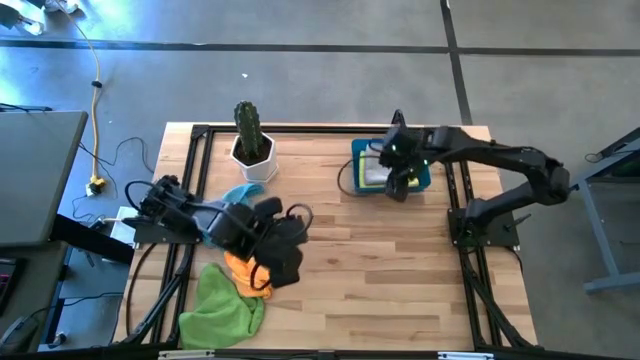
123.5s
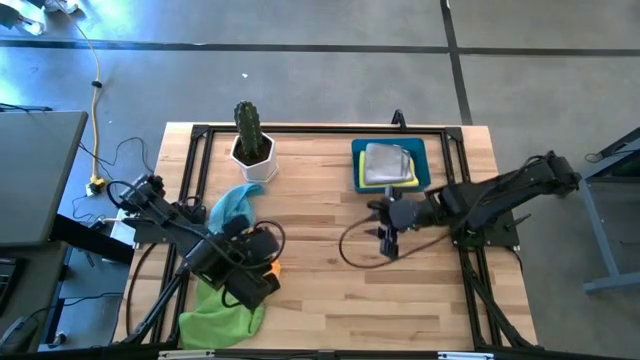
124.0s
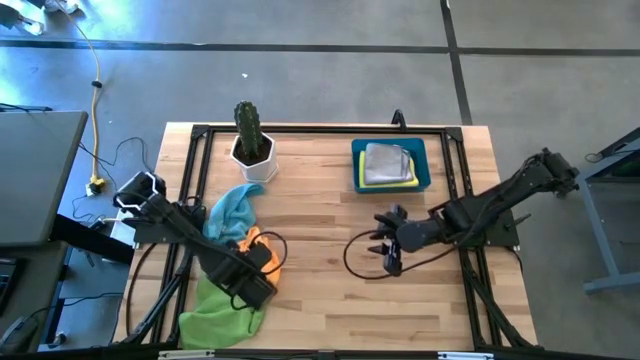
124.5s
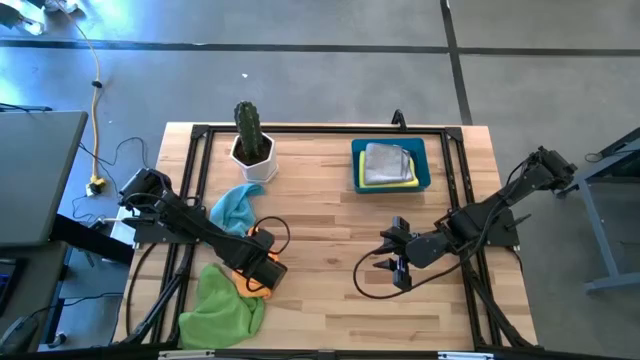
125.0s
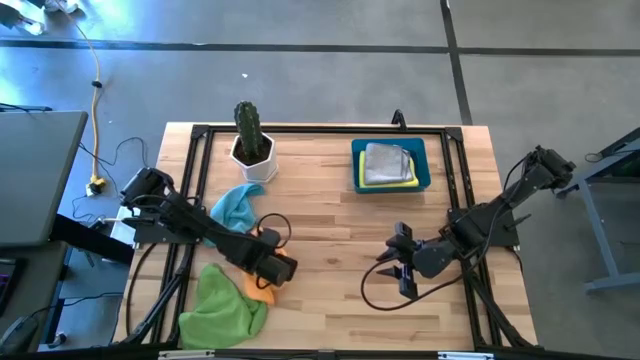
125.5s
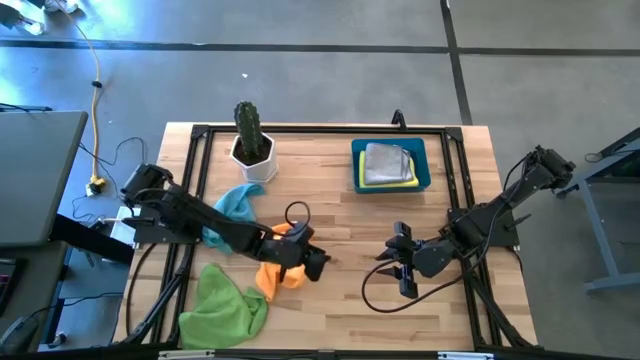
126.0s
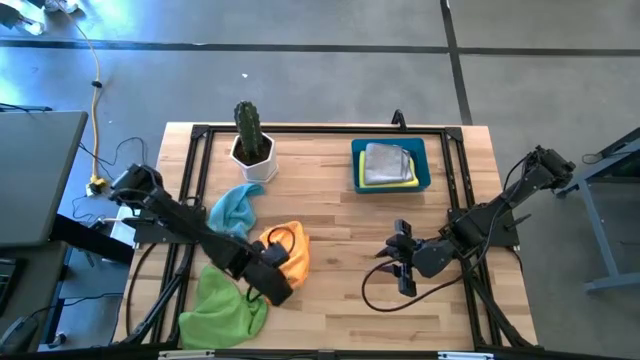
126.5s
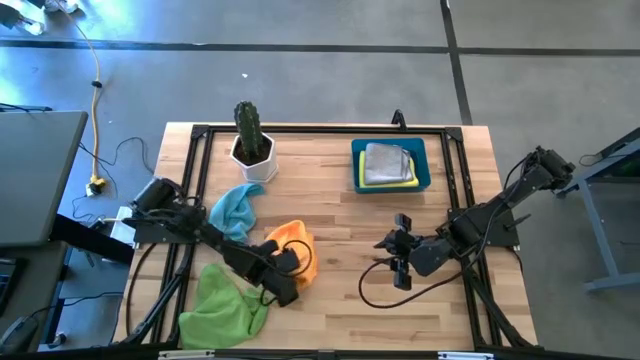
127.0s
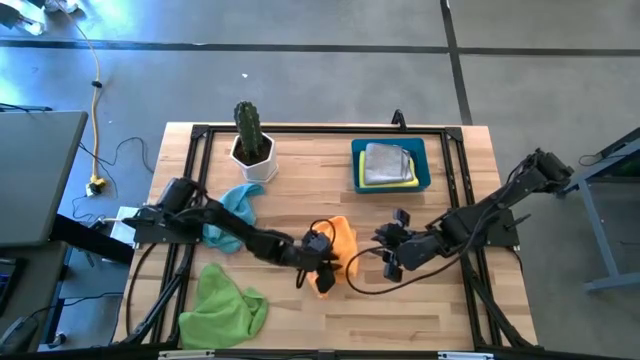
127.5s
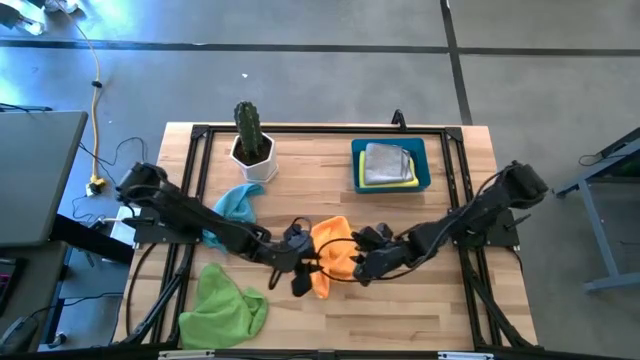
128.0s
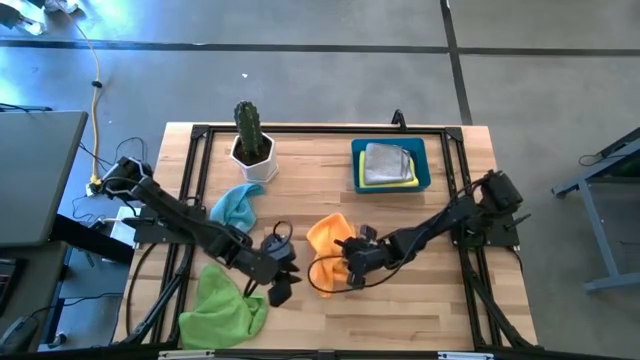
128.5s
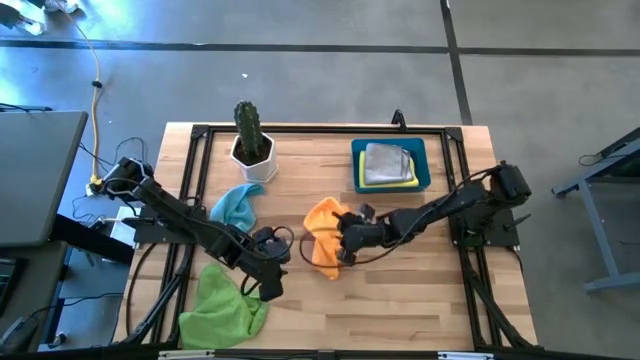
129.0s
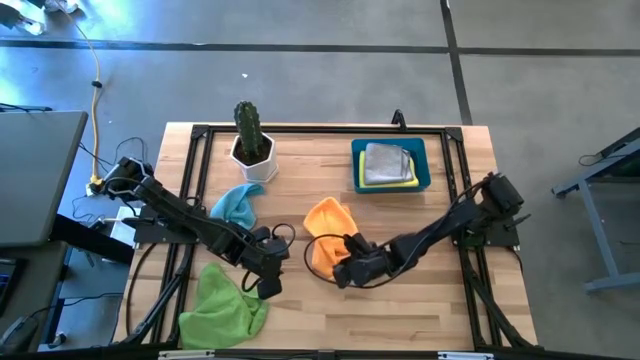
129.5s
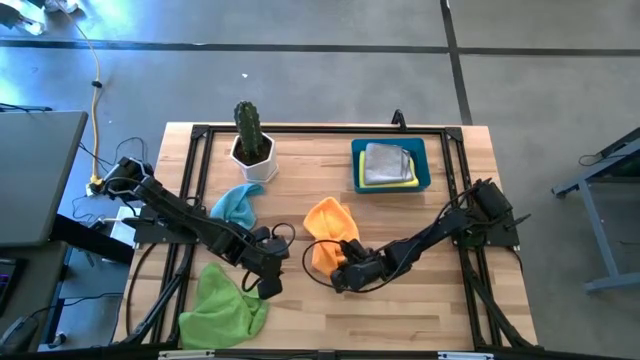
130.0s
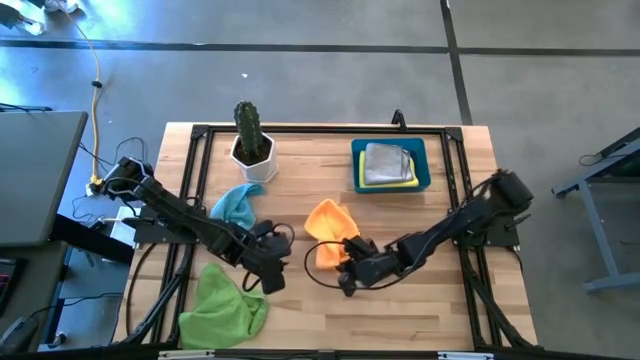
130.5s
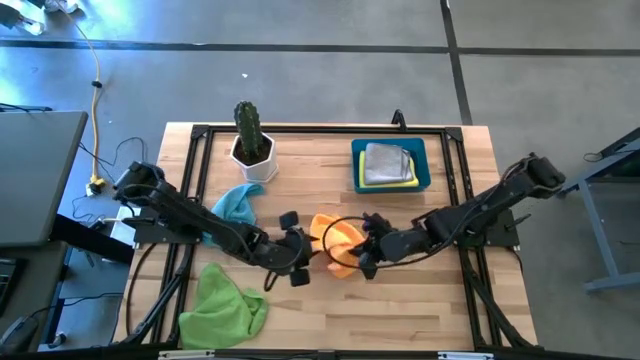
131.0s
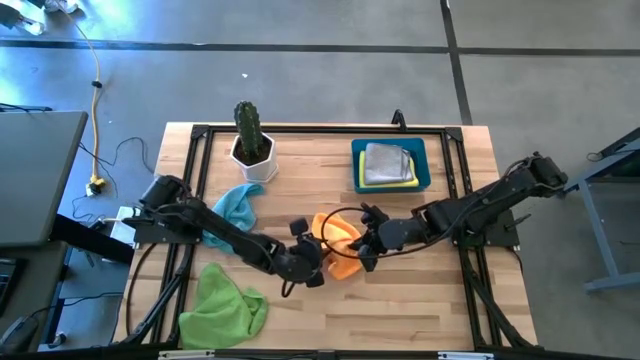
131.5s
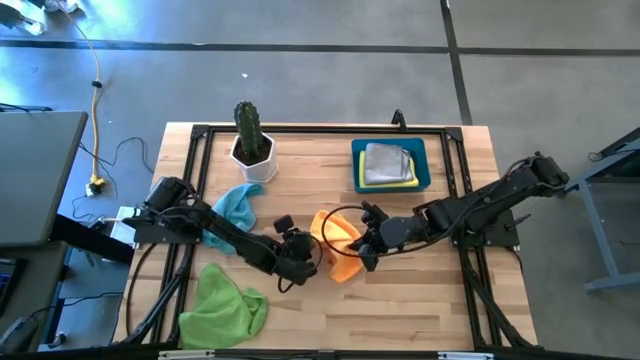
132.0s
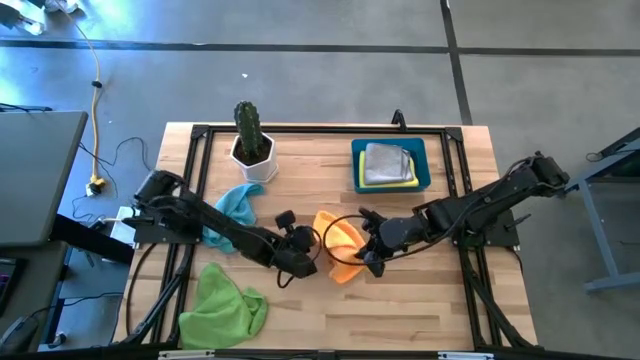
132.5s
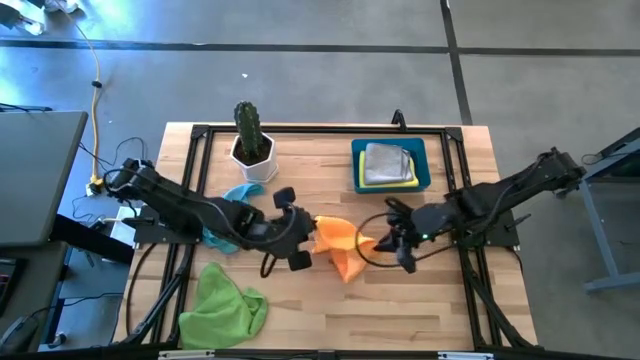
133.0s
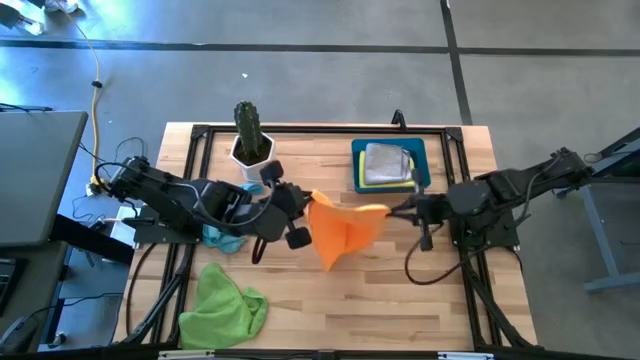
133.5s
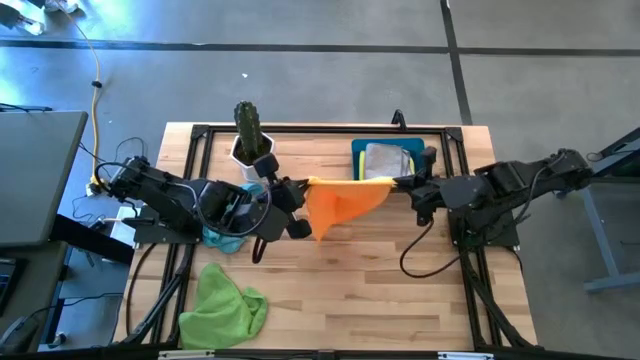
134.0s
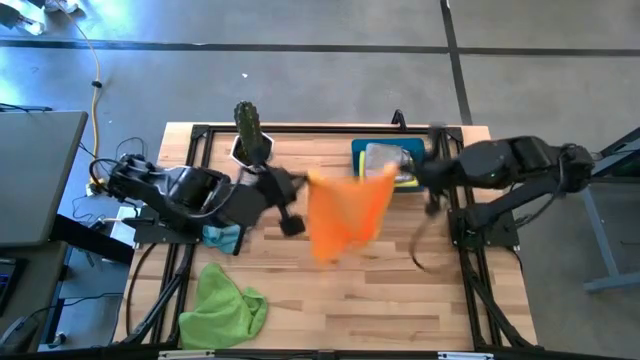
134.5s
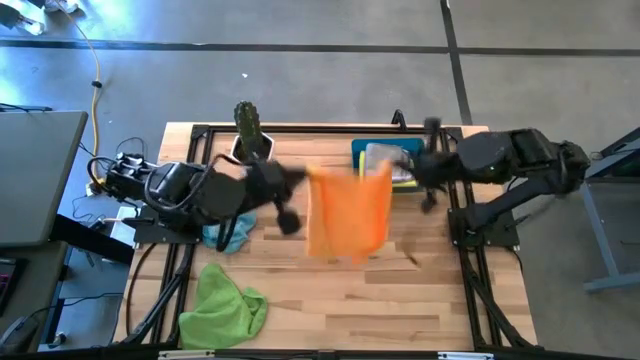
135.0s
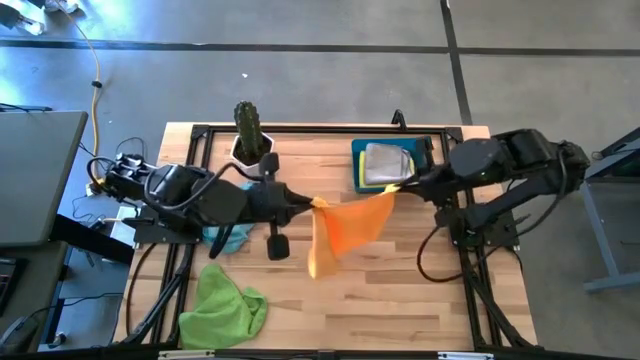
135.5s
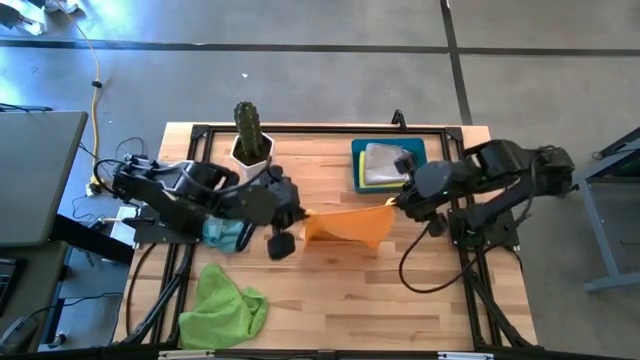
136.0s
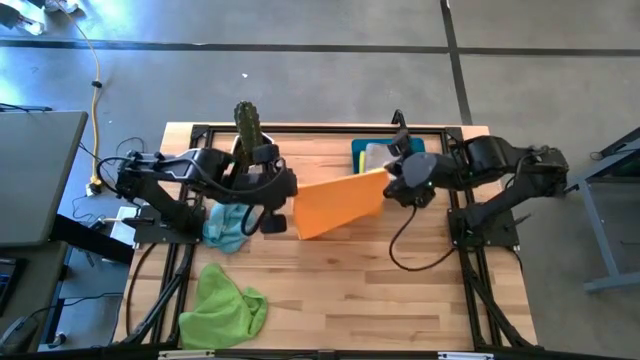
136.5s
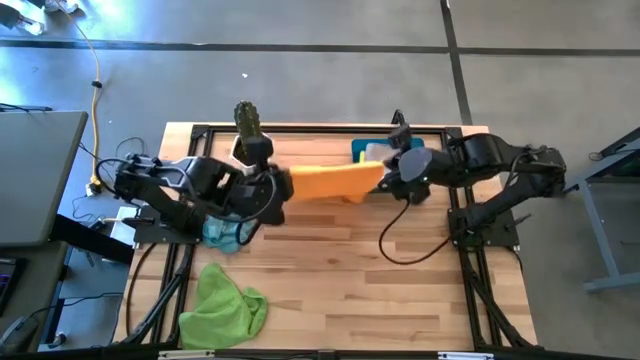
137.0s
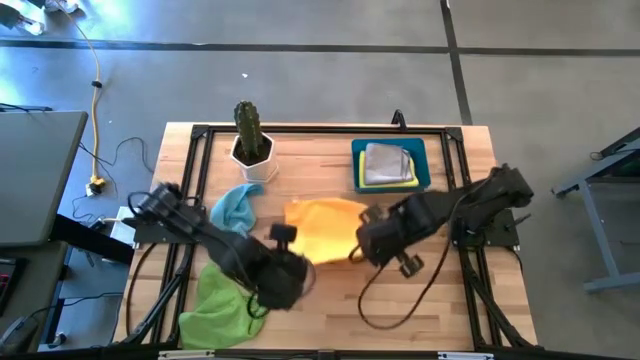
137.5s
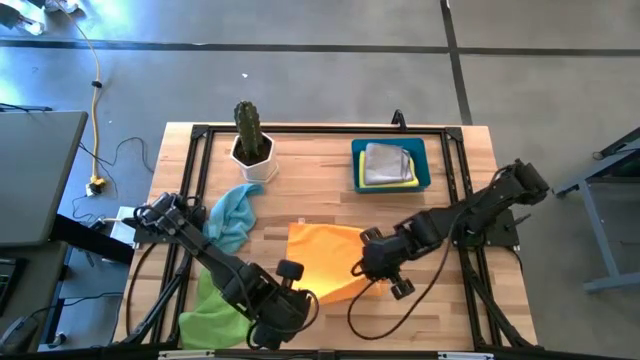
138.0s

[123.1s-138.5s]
Task: Fold microfiber towels
Fold the orange microfiber cloth

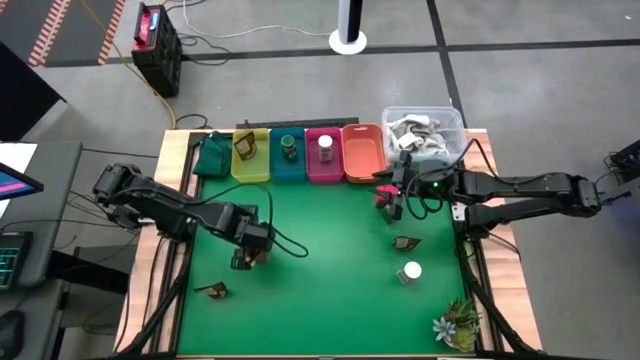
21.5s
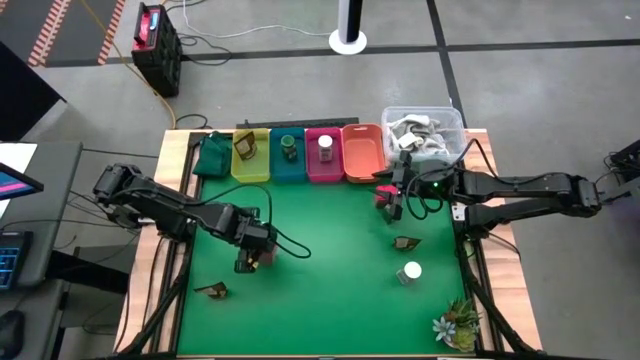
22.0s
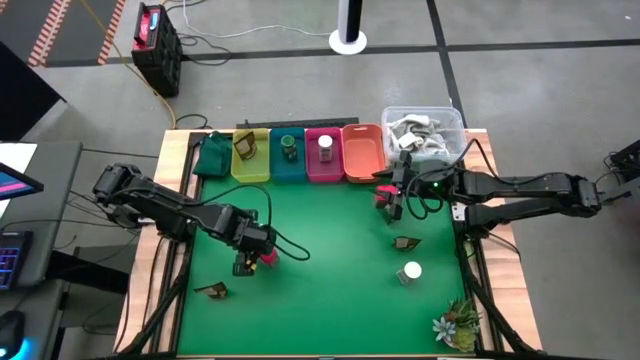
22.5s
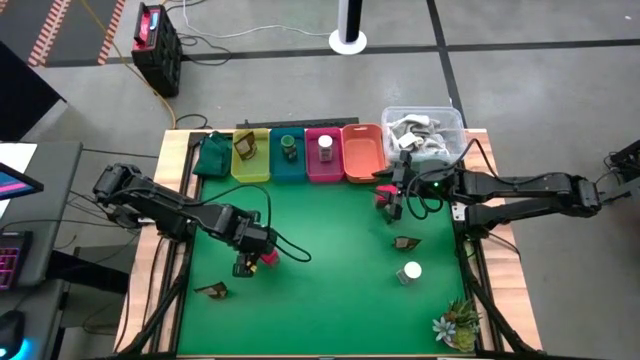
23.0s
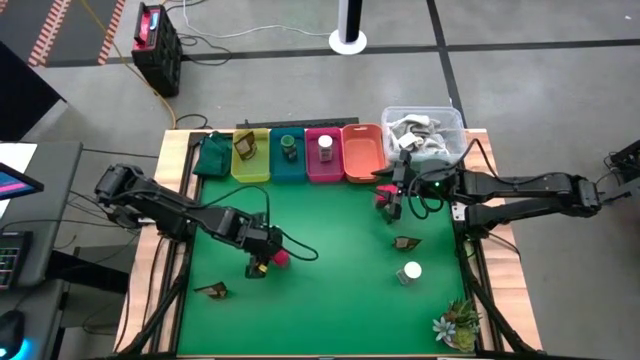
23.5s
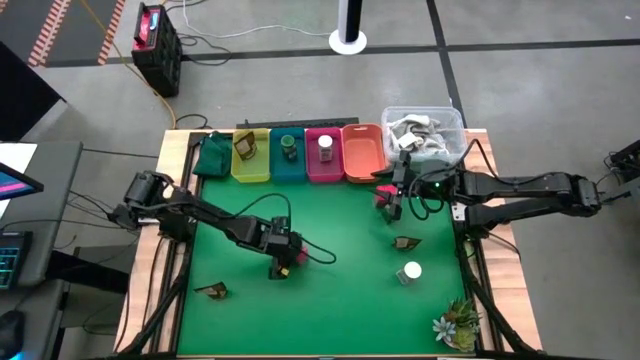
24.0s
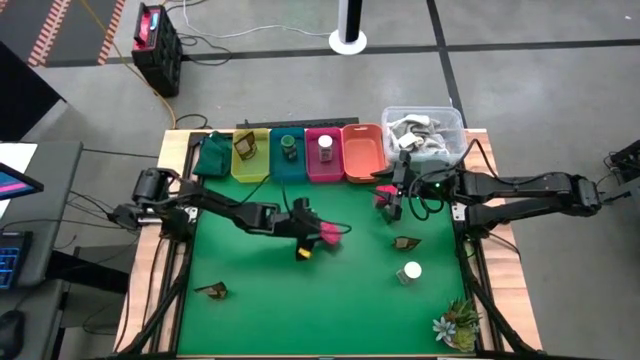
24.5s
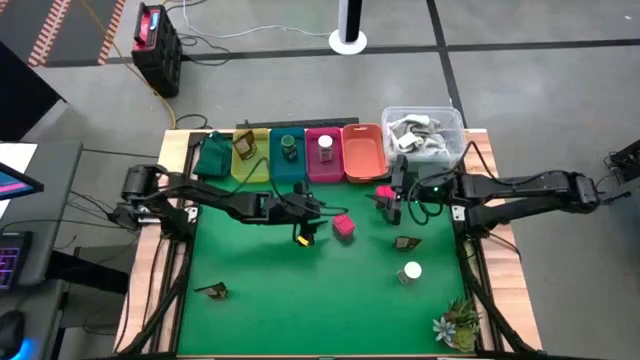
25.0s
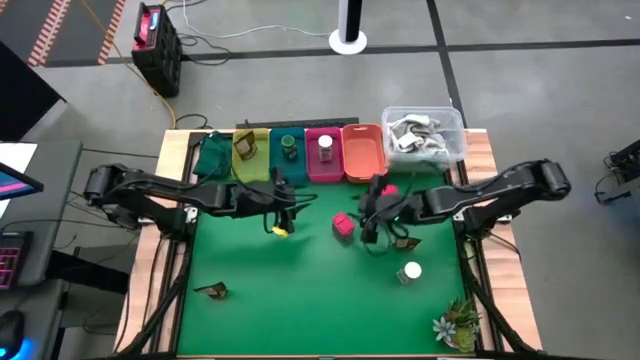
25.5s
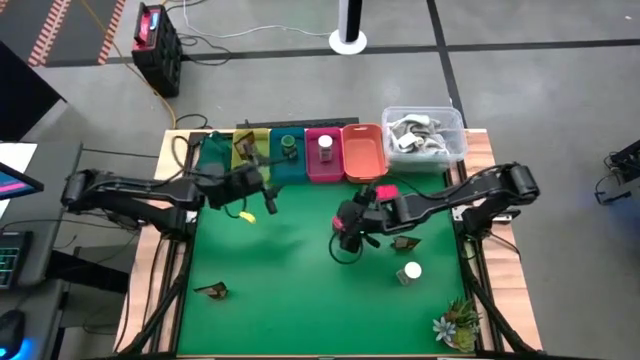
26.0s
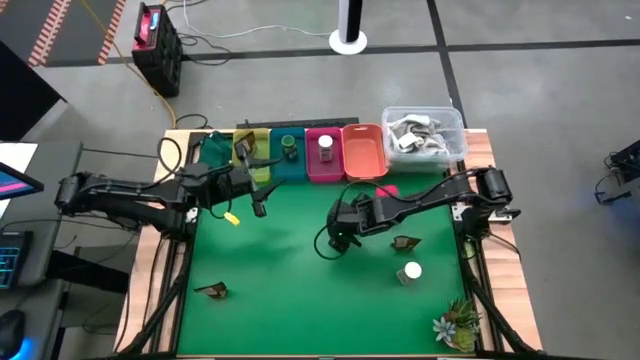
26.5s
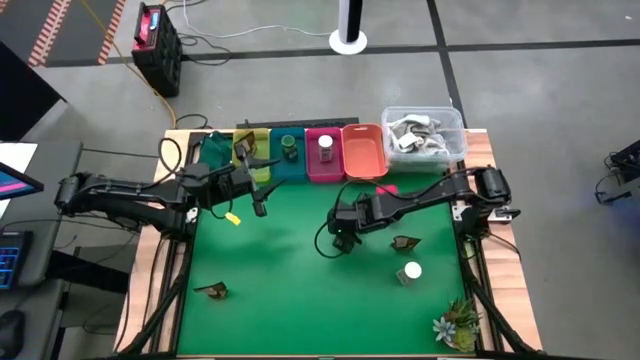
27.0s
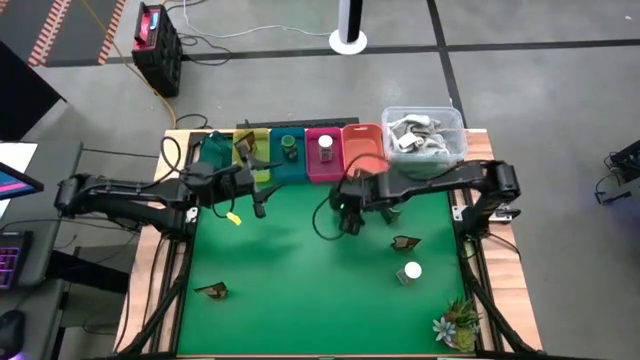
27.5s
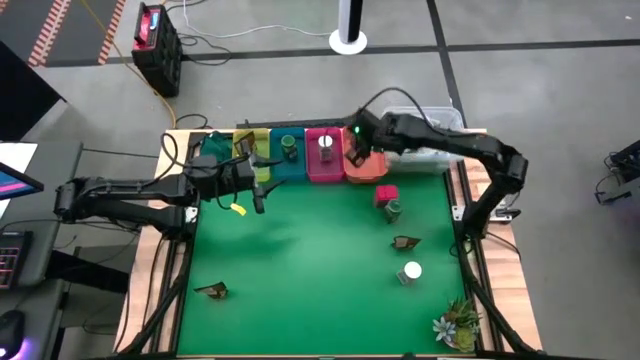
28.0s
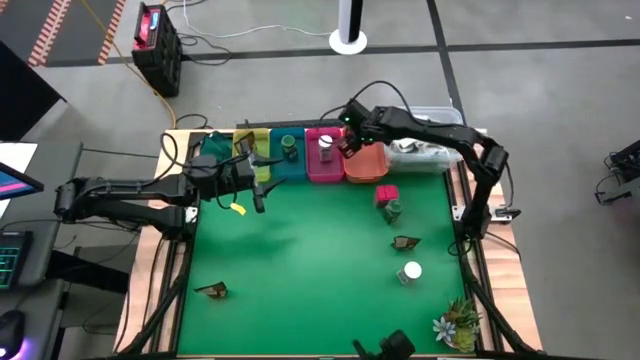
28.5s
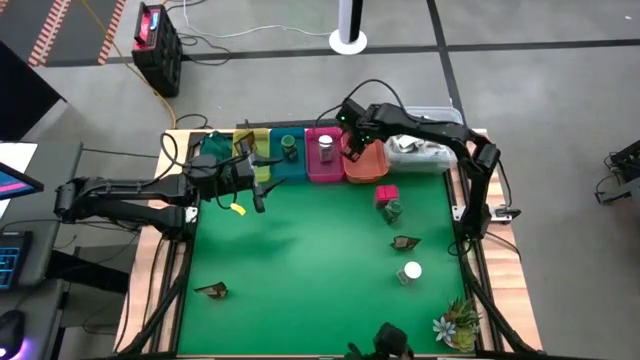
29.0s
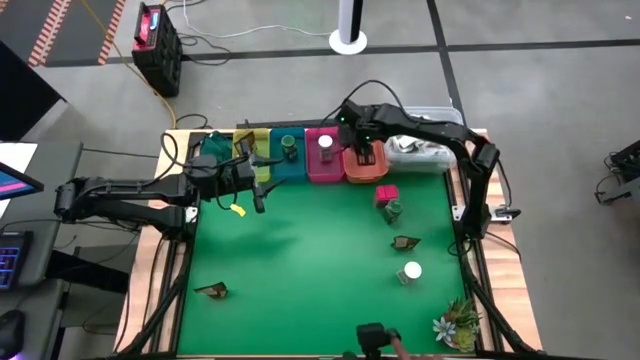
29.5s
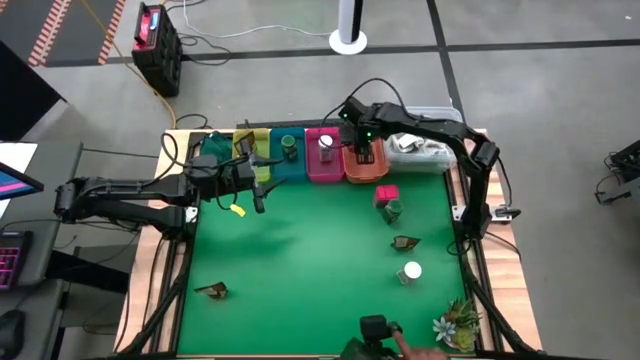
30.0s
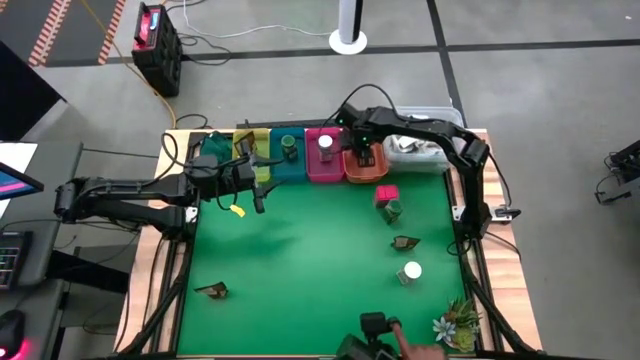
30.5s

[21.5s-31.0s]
Task: Sort spices by type
Put the left red spice can into the orange bin
